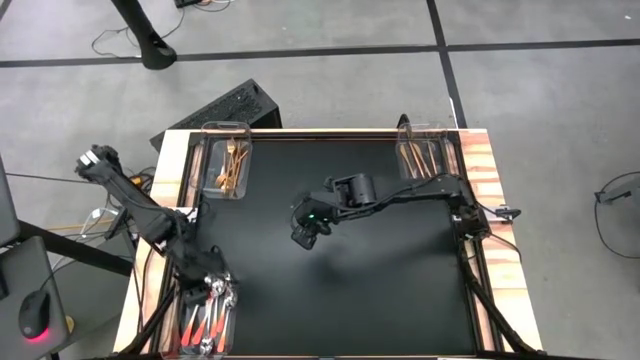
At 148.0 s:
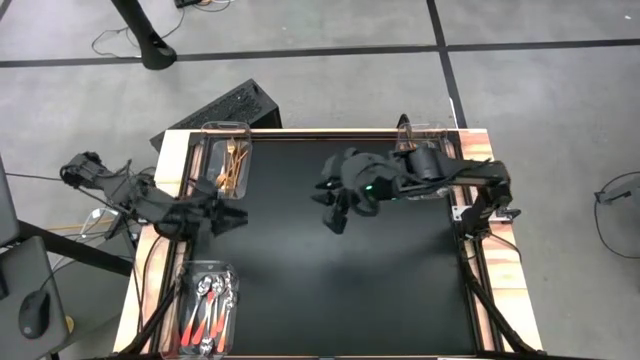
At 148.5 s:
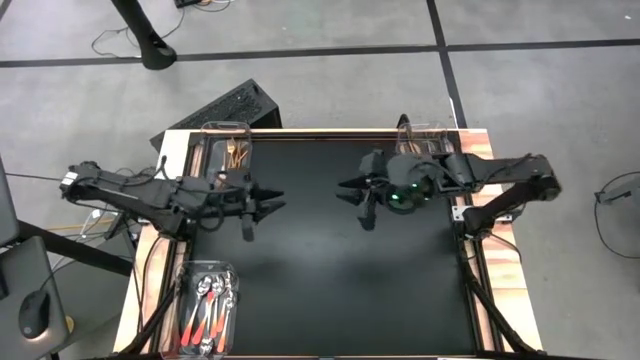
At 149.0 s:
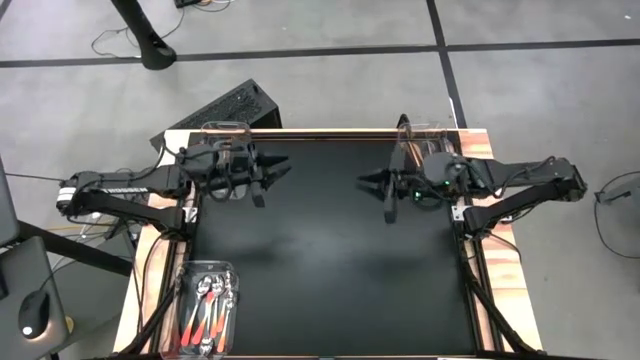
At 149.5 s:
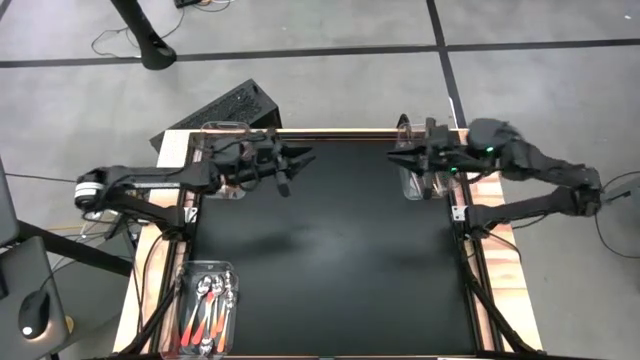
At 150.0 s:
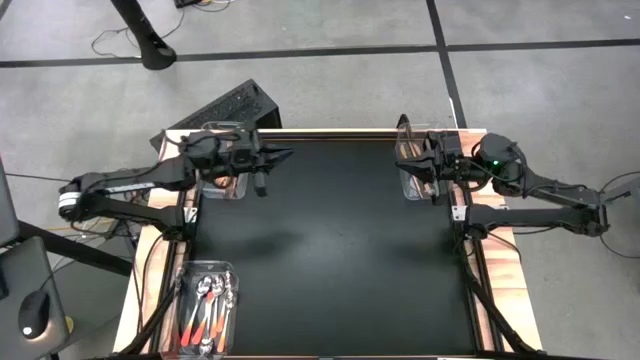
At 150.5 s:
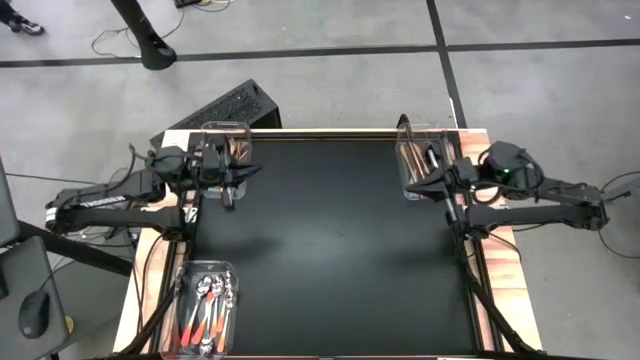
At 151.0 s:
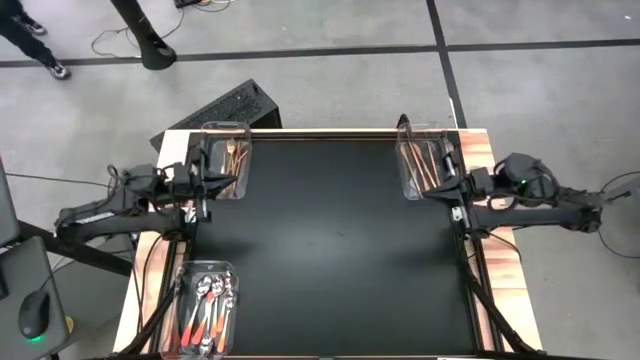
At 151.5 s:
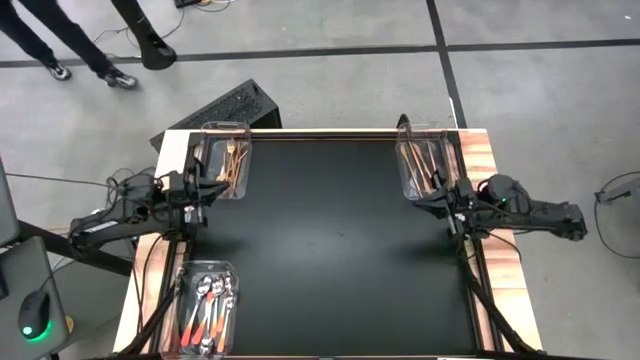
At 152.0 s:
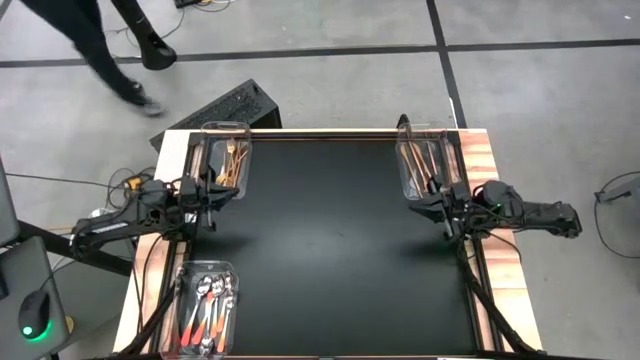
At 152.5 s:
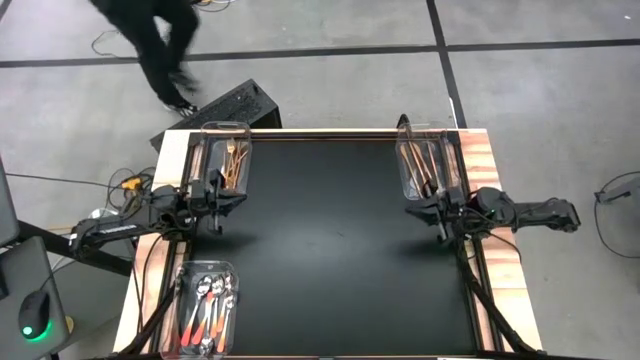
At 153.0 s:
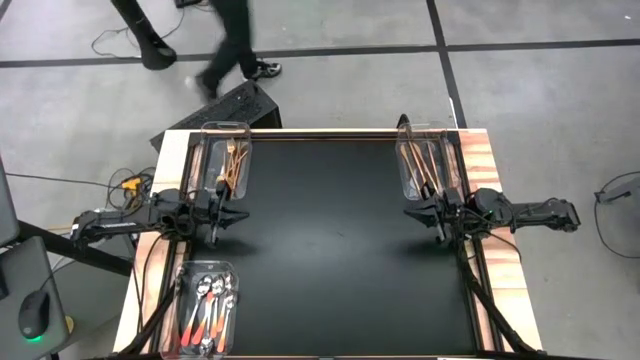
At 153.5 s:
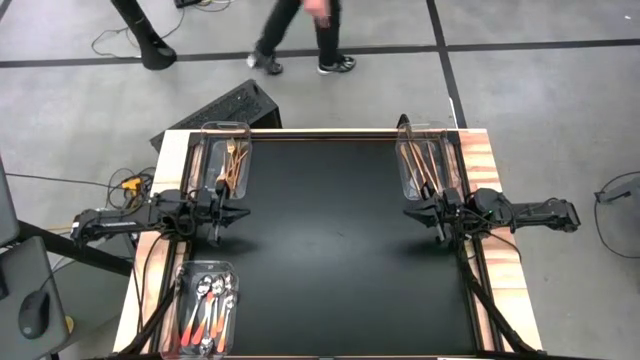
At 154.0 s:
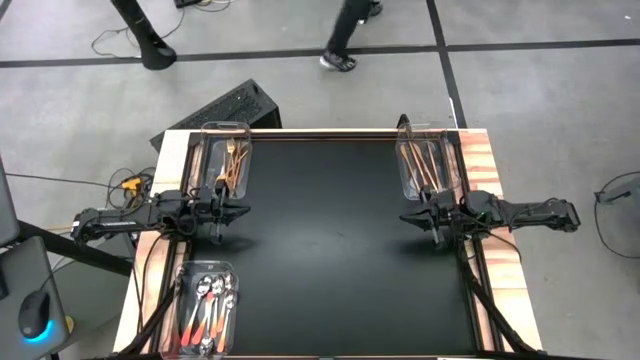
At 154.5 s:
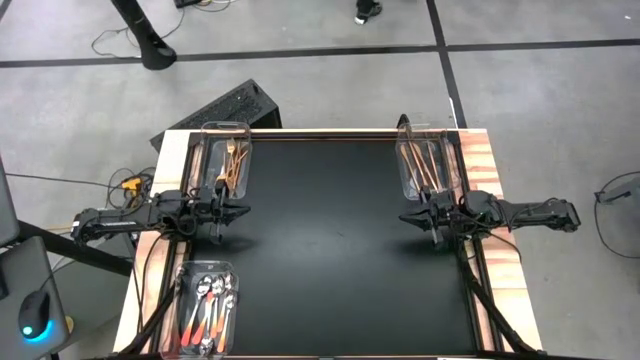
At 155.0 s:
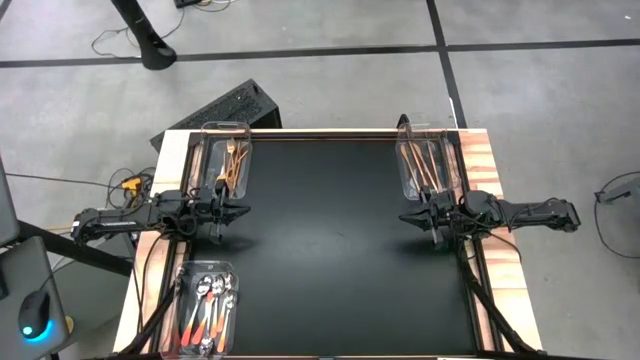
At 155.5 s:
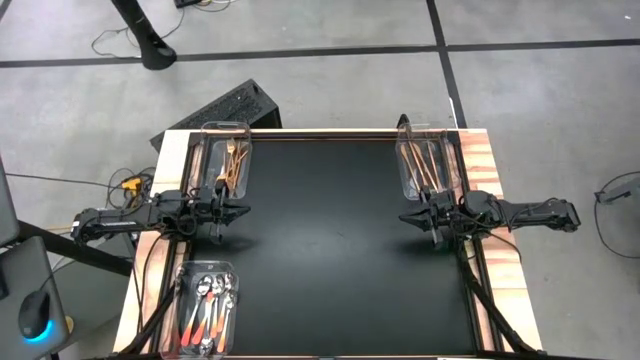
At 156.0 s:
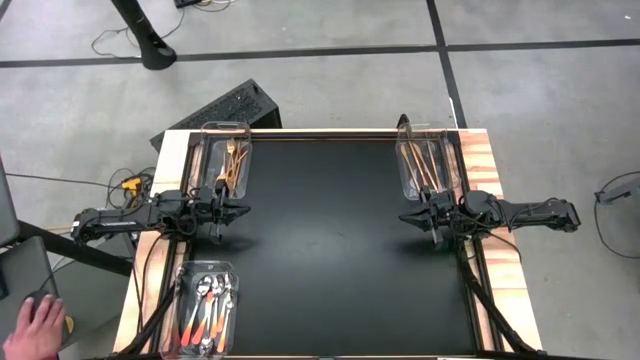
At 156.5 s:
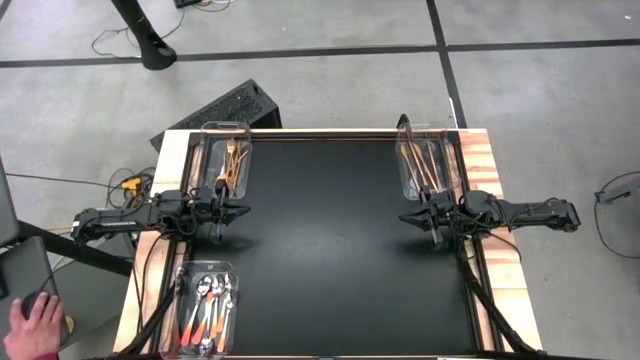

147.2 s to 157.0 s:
Task: Sort silverware by color (type)
Return to Home Position

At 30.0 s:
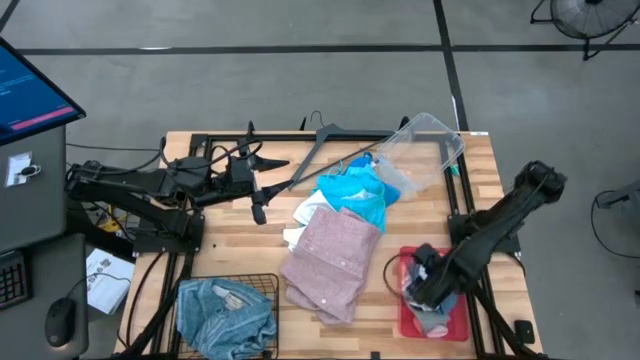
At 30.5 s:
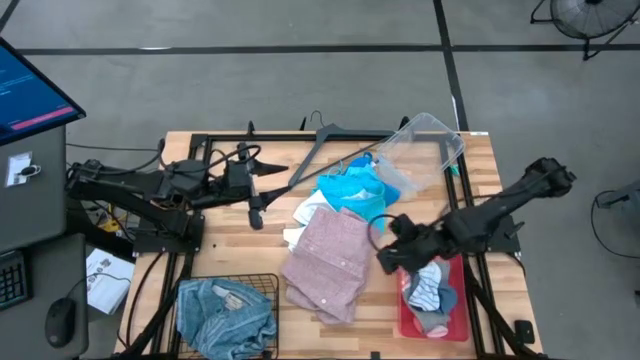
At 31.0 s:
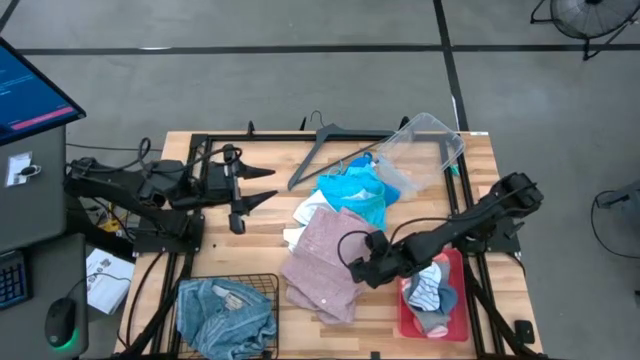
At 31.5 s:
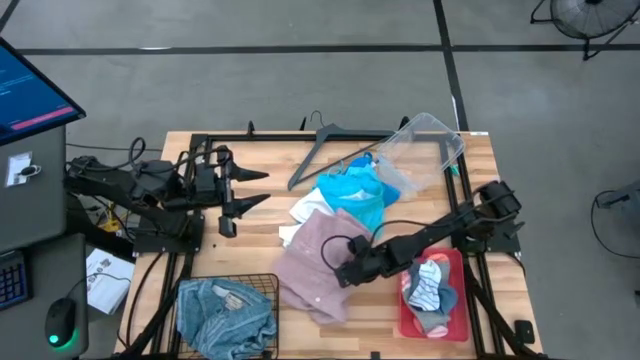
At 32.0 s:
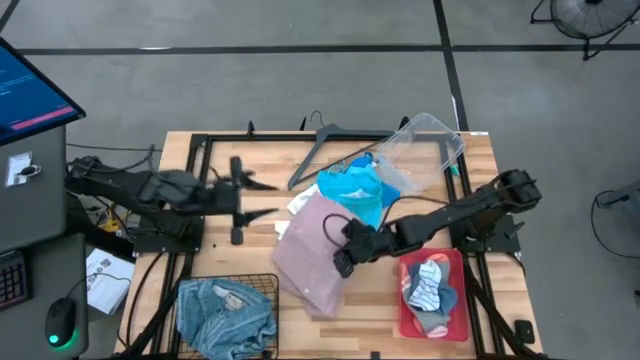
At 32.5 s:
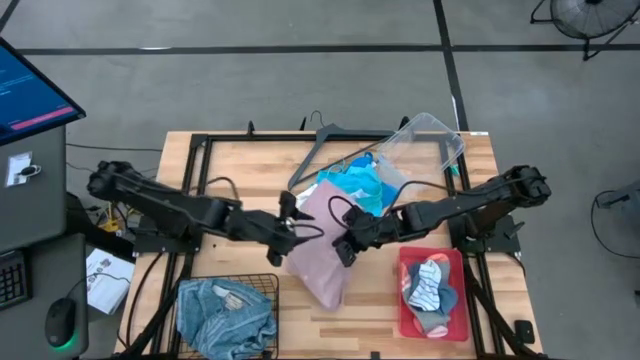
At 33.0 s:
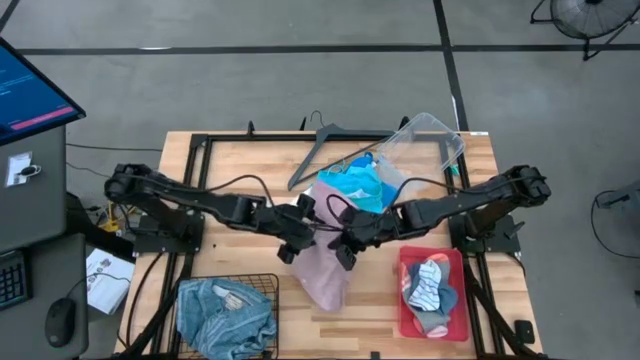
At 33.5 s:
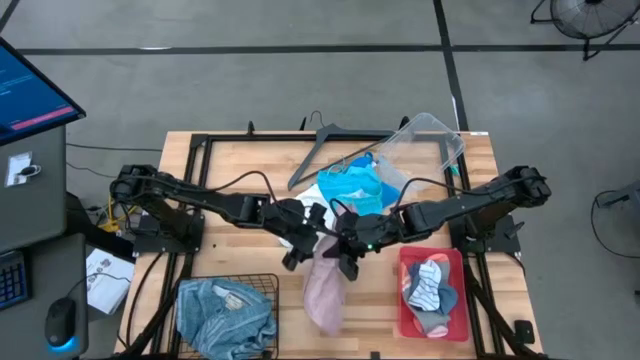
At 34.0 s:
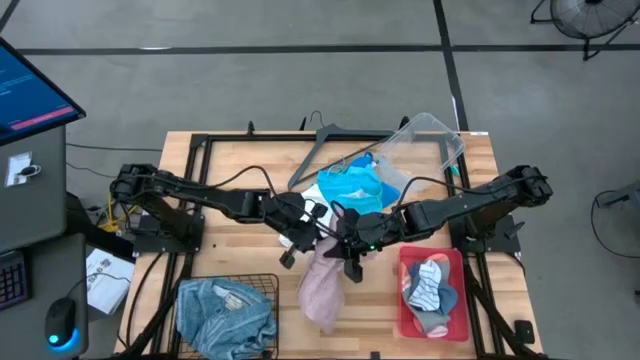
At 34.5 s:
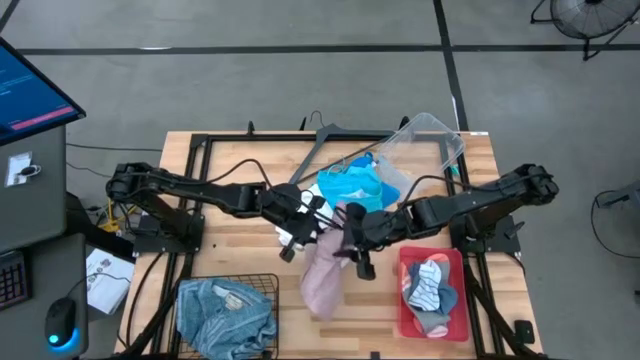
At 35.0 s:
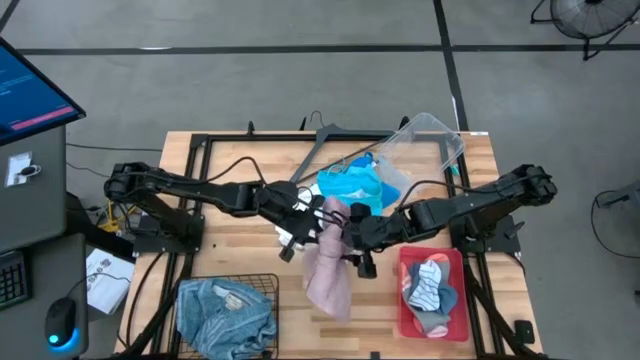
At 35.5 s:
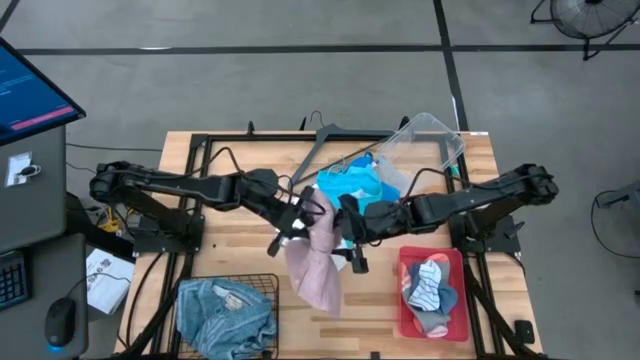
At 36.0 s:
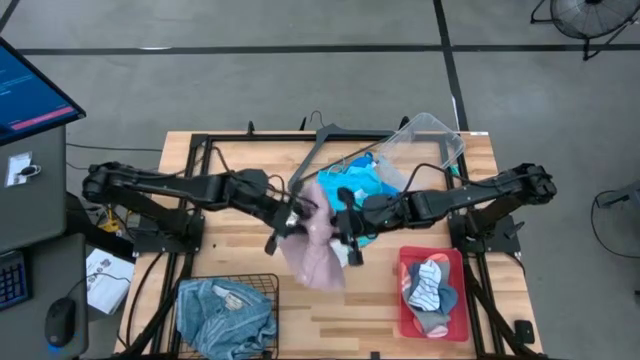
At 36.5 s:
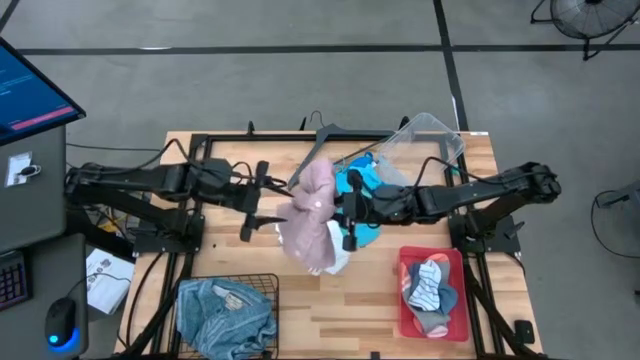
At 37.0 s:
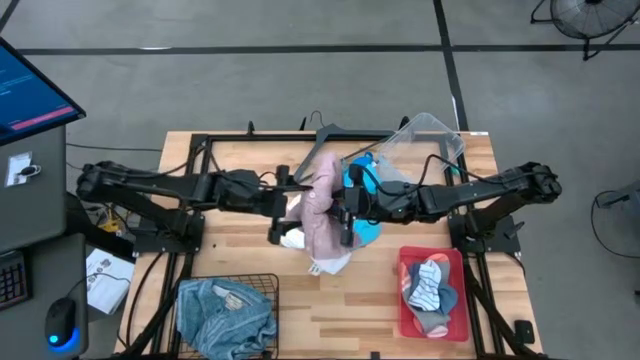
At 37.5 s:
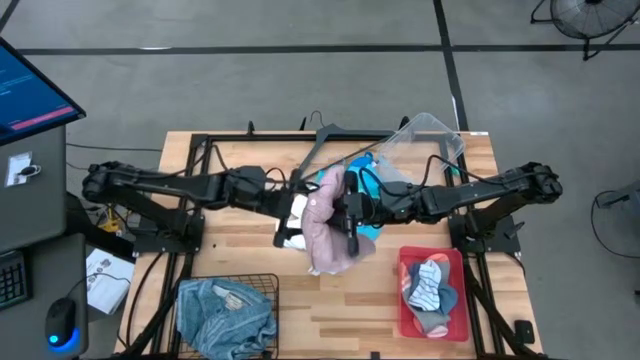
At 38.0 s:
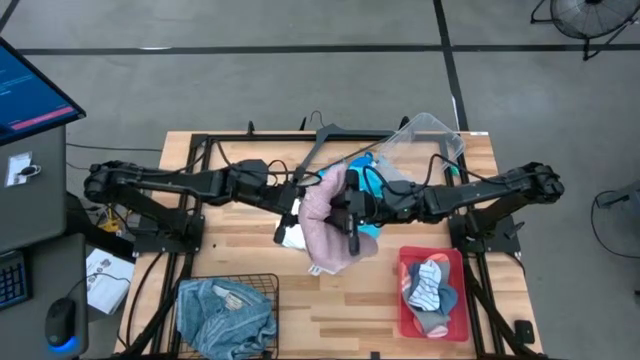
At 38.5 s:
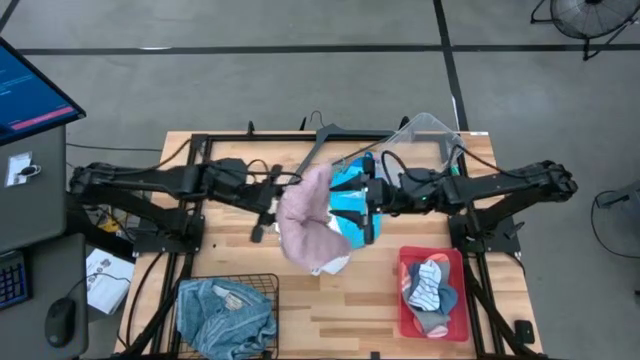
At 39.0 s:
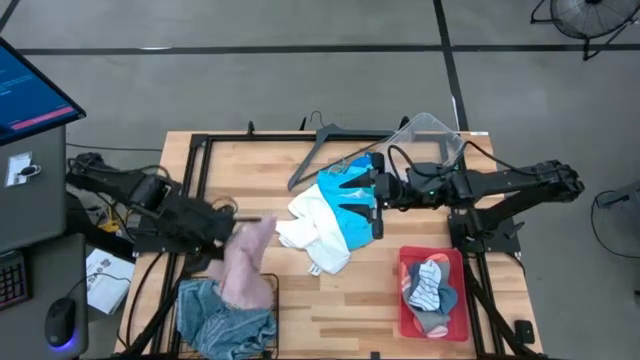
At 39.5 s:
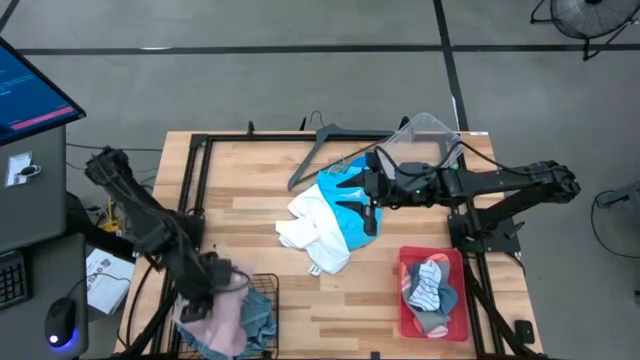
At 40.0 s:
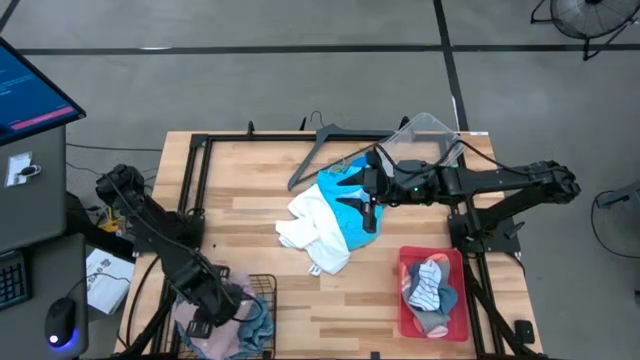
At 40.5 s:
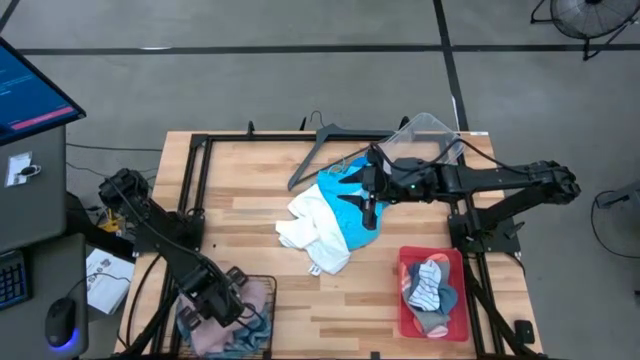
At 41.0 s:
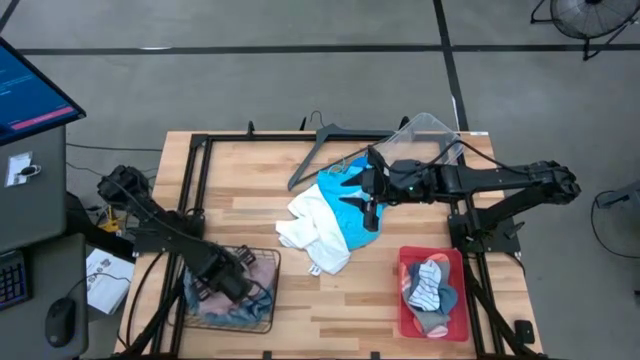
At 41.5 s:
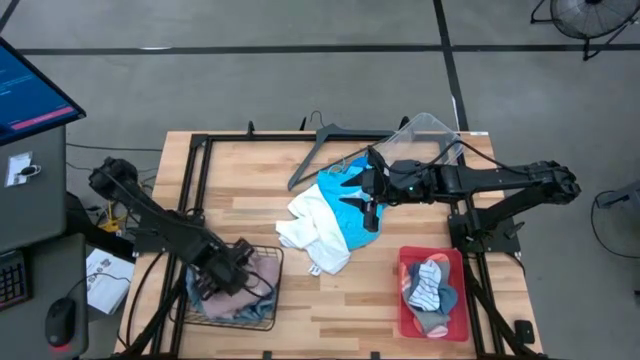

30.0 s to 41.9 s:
Task: Pick & Place Cloths
Put the pink polo shirt into the wire basket
